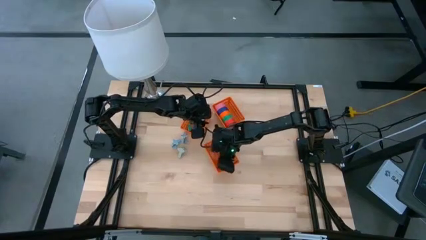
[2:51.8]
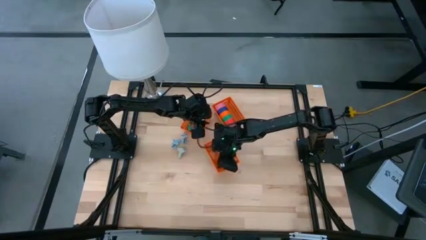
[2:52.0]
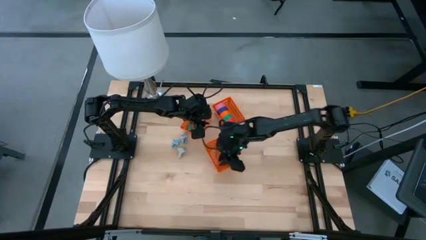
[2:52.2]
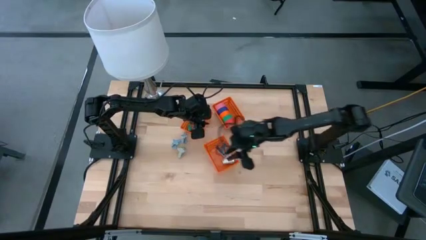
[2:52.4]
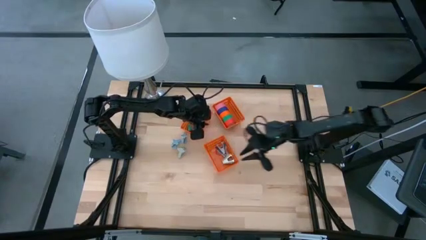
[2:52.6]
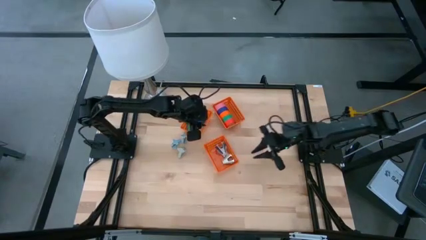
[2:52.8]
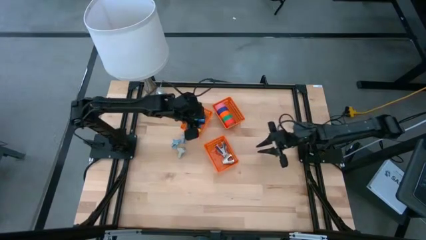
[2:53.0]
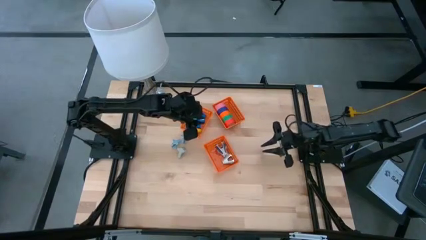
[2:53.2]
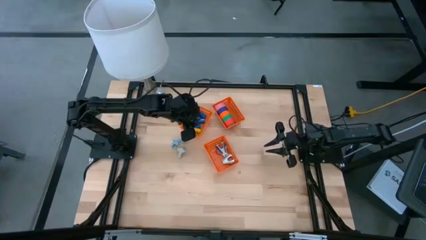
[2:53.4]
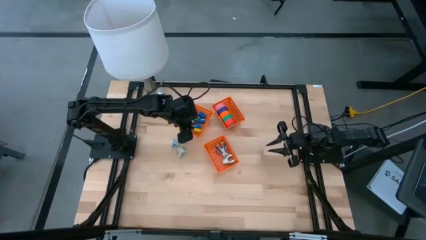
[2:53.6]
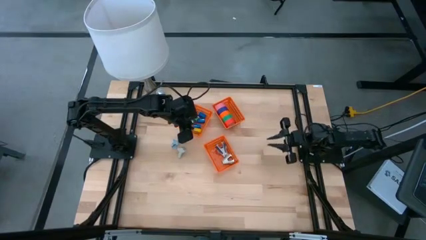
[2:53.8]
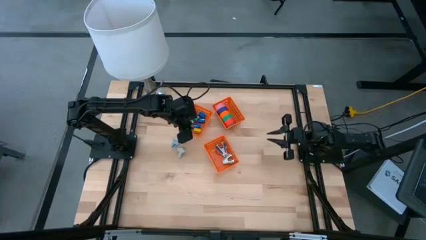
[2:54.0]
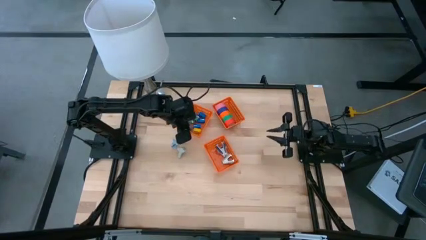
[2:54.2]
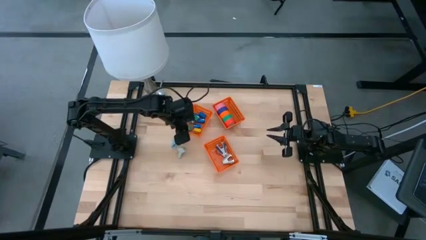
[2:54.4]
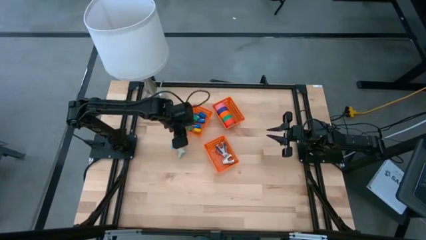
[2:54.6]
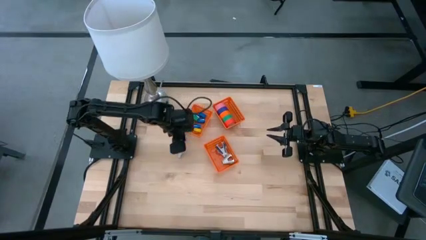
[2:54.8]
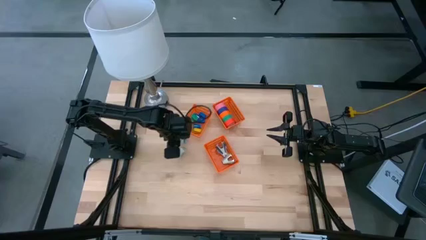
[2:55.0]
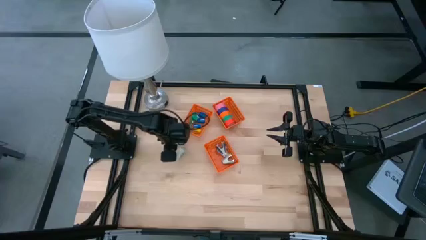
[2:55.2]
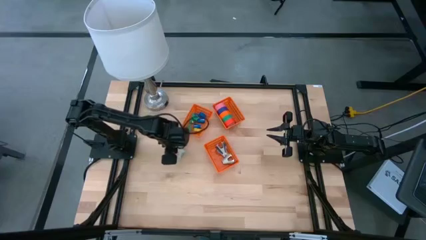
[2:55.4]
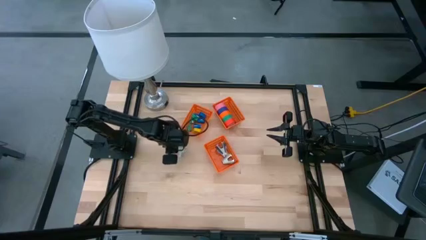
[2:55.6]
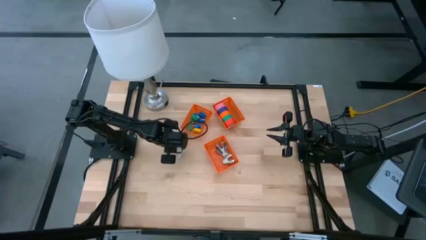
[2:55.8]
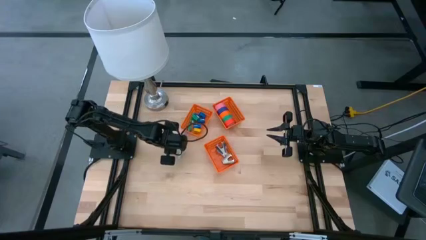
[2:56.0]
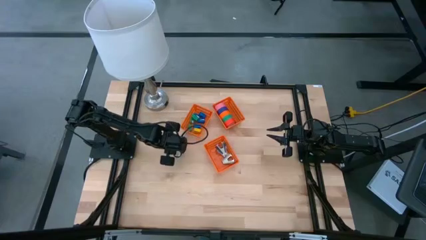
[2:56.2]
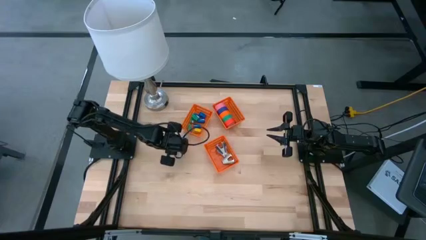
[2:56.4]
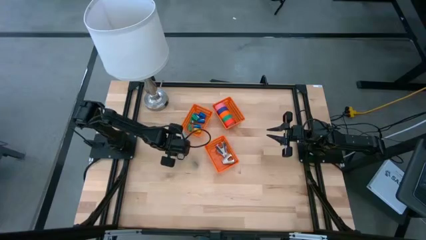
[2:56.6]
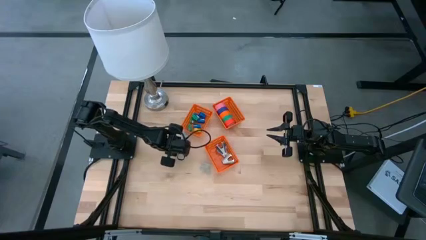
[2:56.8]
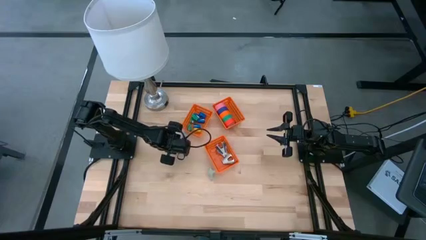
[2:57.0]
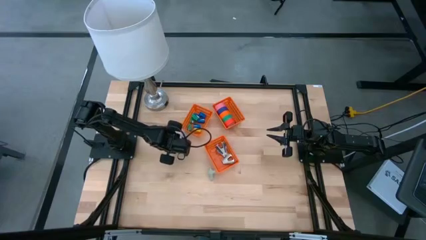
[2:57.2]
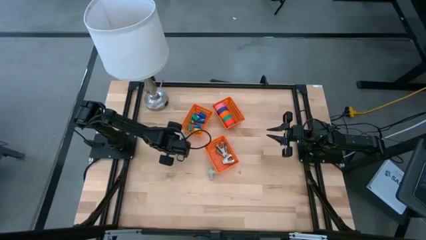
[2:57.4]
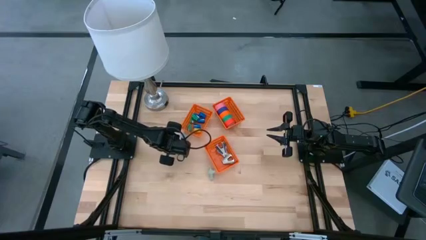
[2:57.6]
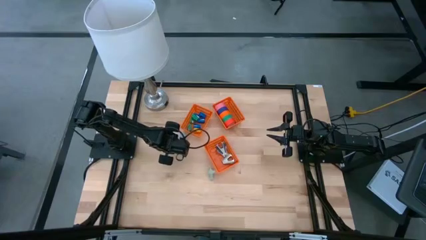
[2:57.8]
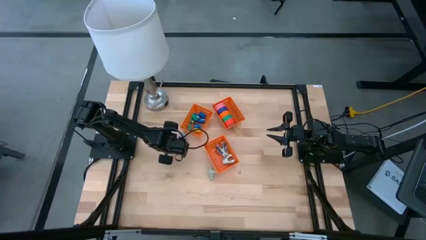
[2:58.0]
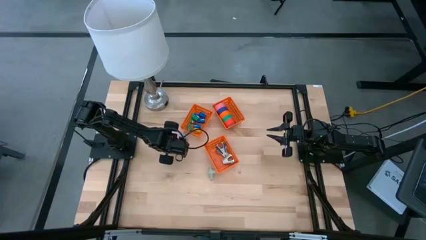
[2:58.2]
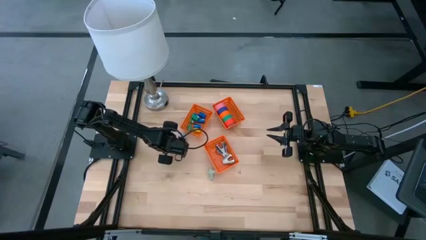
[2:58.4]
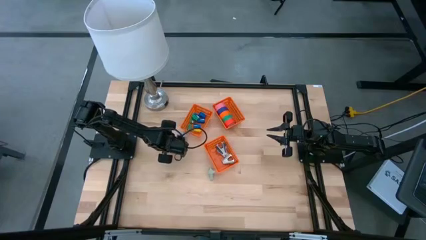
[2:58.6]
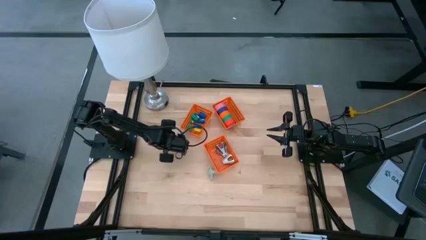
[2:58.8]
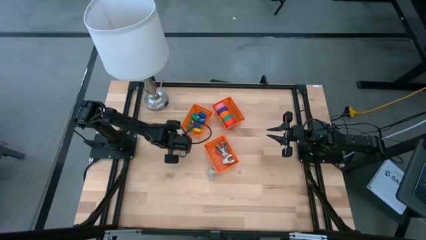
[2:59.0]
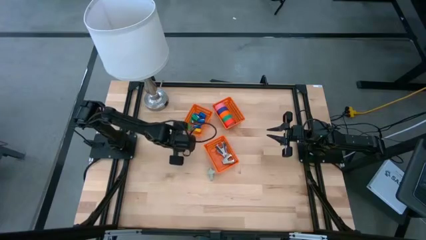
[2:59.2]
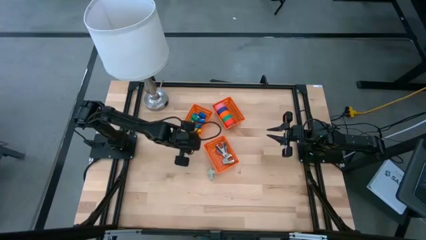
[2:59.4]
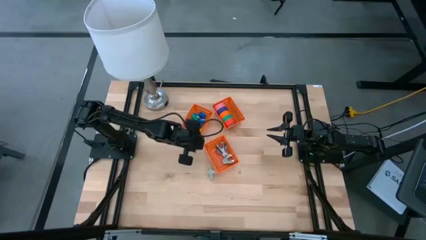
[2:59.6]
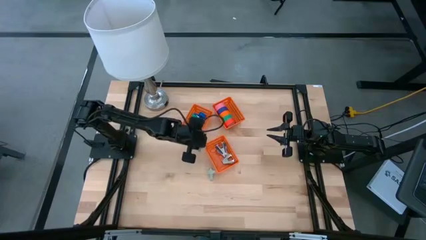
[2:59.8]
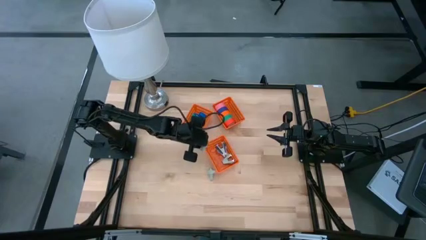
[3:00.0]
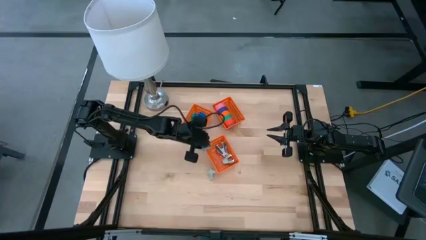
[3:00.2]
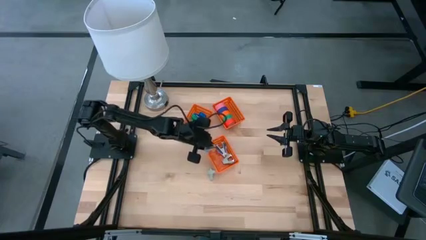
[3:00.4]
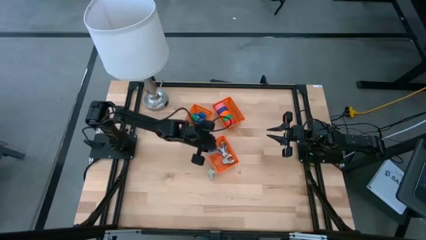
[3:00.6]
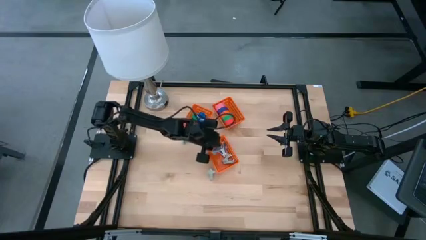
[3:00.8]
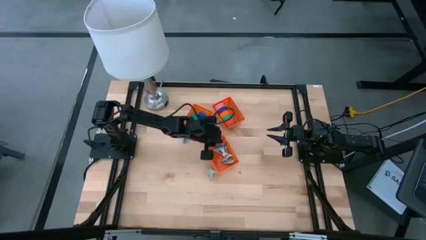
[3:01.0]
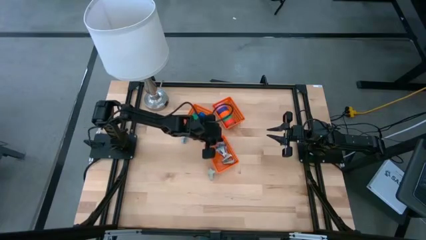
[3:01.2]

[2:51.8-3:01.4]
Task: Pick and place Stapler, Stapler remover, tape
Put the light blue staple remover into the middle orange bin

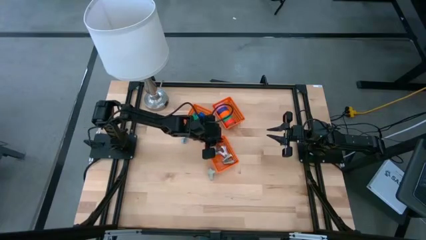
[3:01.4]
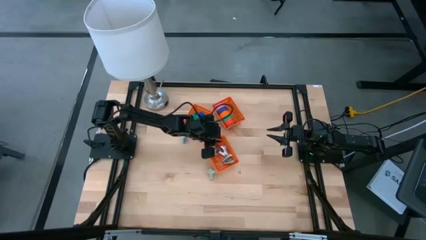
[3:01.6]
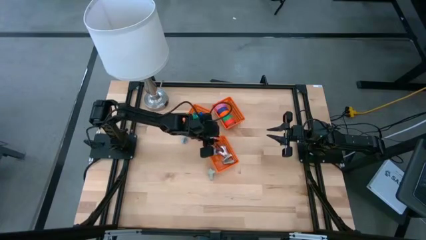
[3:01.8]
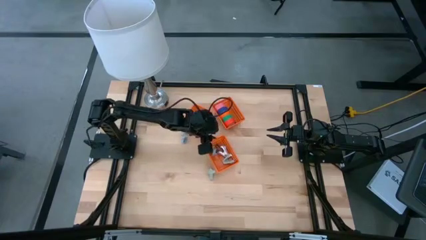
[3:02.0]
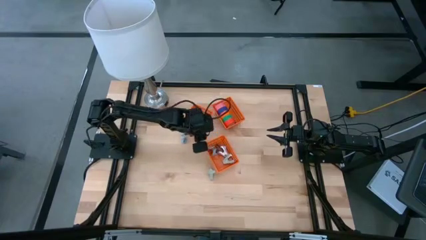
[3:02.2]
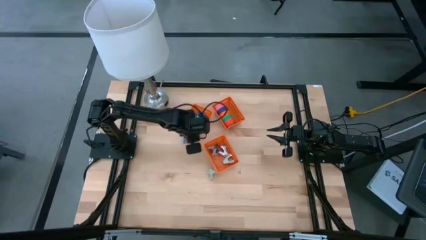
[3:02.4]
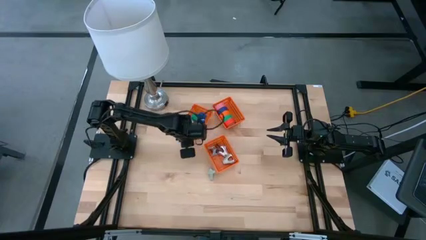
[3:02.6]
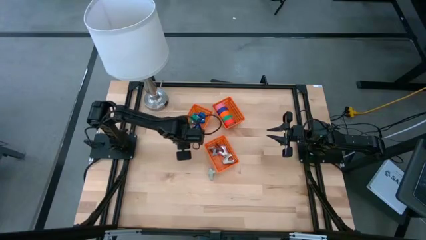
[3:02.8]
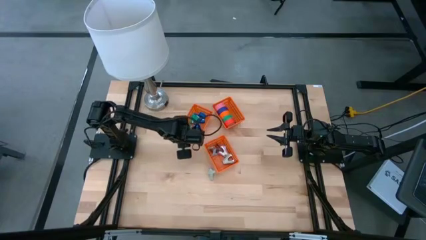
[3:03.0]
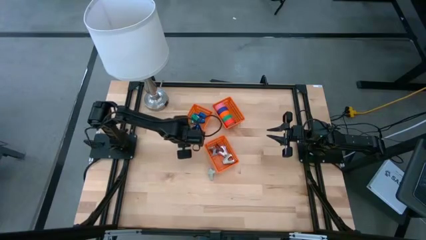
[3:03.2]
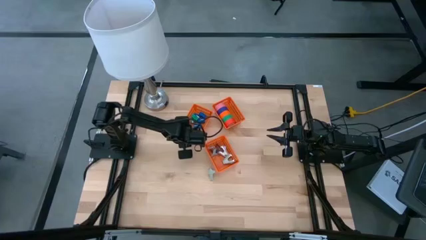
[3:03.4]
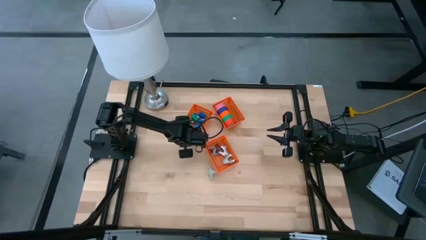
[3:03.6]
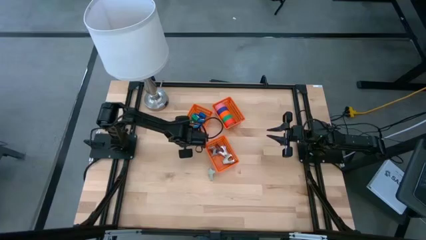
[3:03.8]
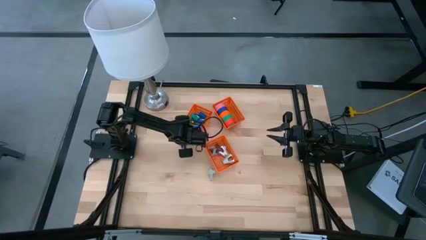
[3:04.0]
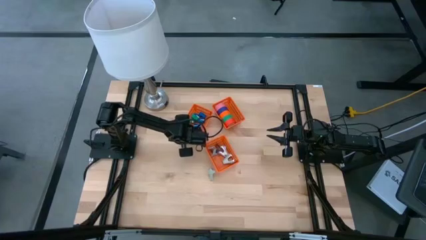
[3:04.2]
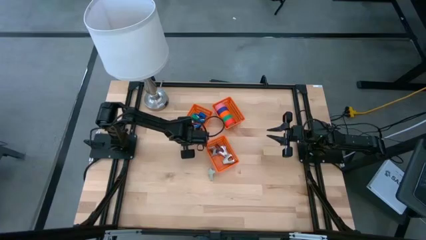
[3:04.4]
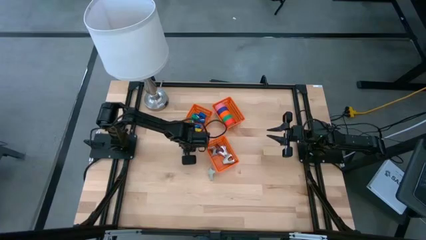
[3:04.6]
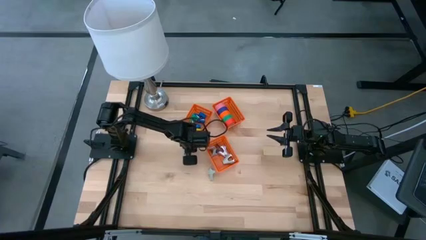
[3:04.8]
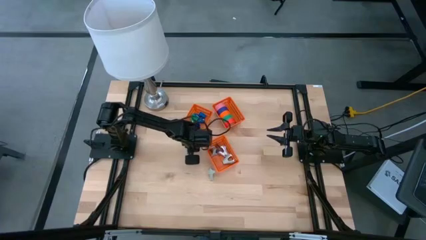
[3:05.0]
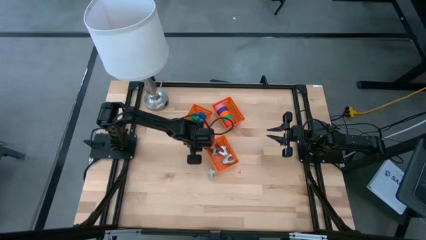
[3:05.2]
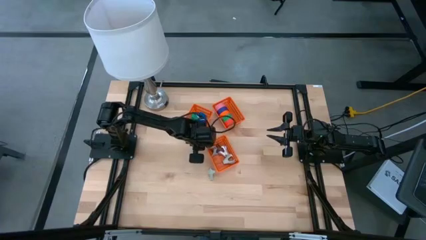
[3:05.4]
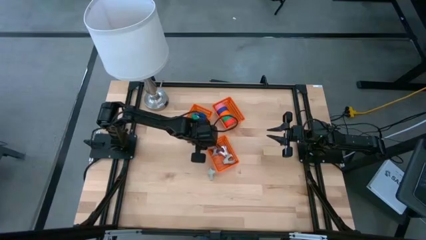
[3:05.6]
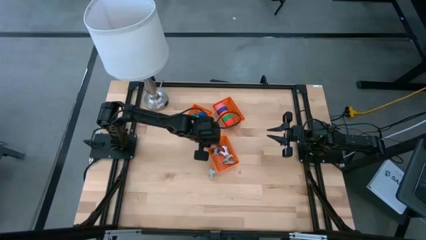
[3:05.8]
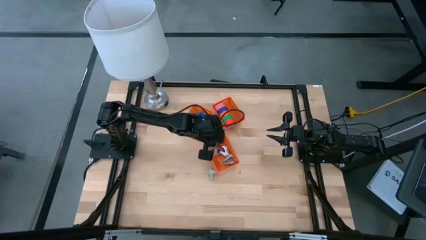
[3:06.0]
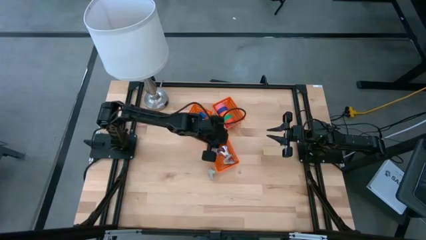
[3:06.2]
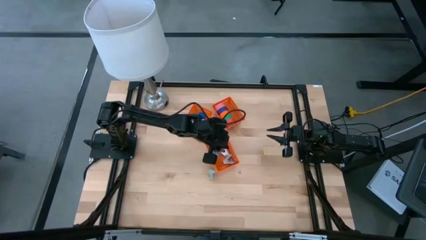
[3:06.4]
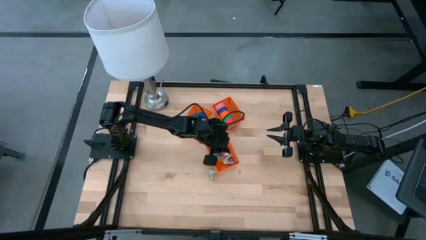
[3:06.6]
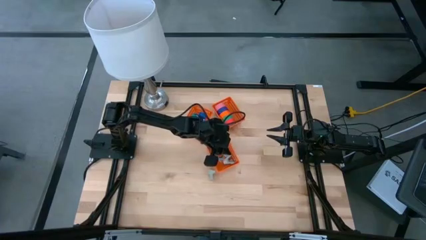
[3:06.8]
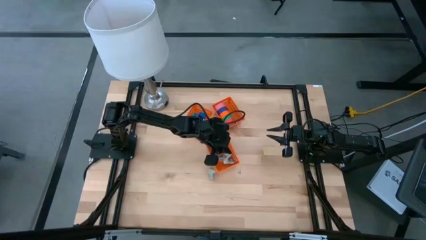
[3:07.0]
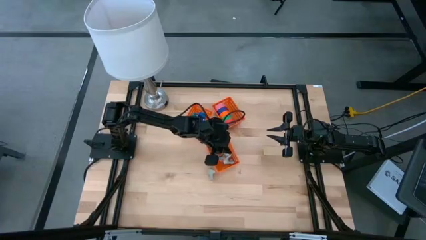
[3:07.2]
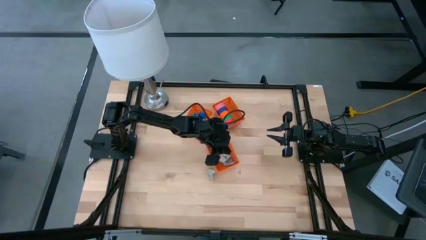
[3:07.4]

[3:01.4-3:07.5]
Put the light blue staple remover into the middle orange bin
